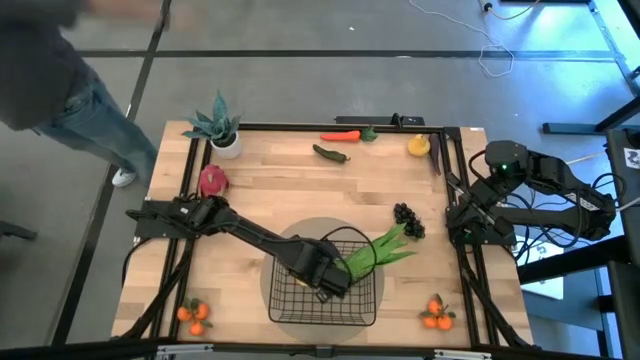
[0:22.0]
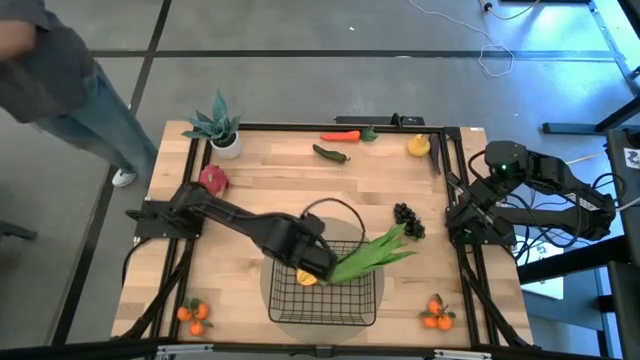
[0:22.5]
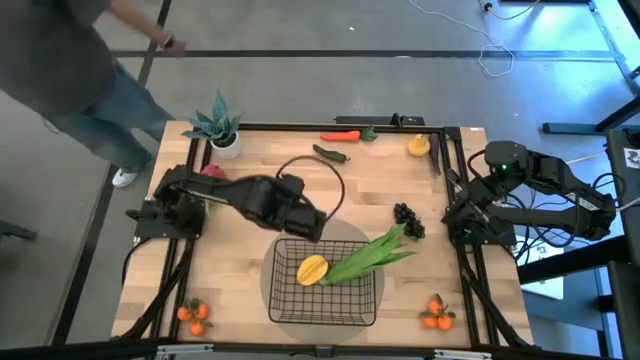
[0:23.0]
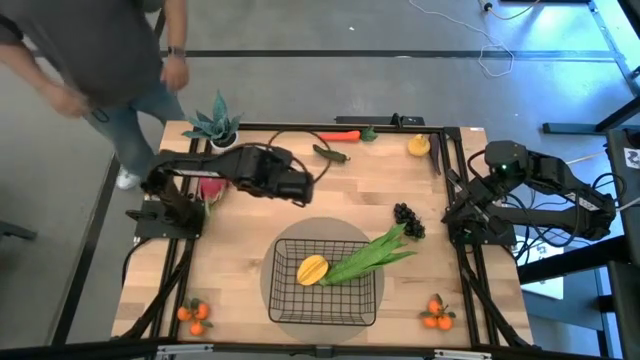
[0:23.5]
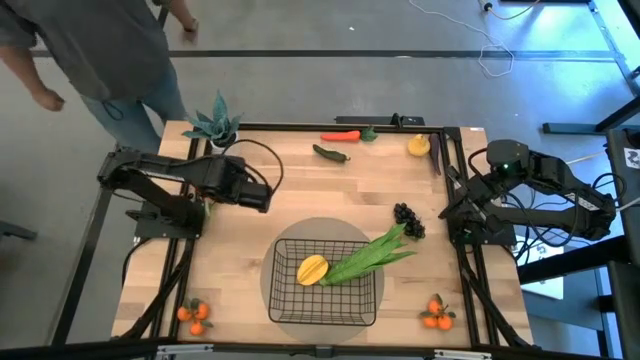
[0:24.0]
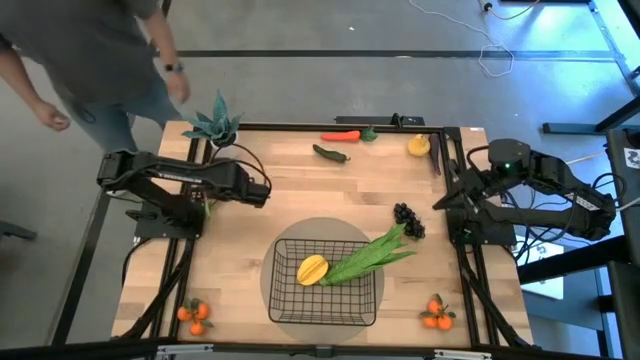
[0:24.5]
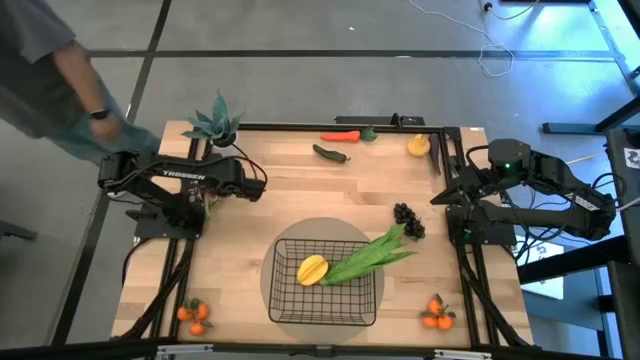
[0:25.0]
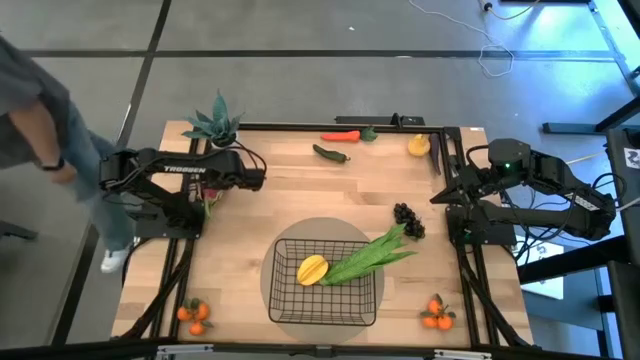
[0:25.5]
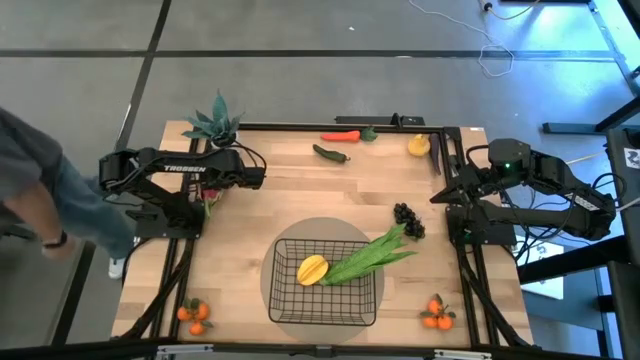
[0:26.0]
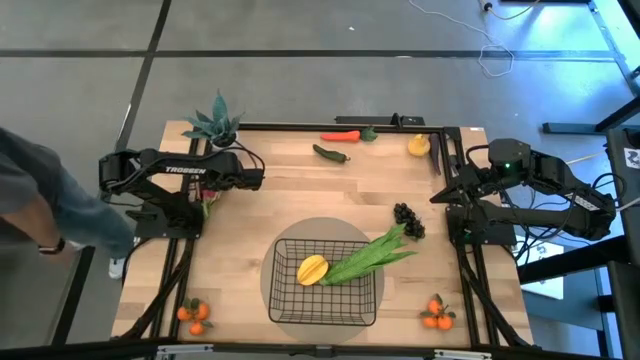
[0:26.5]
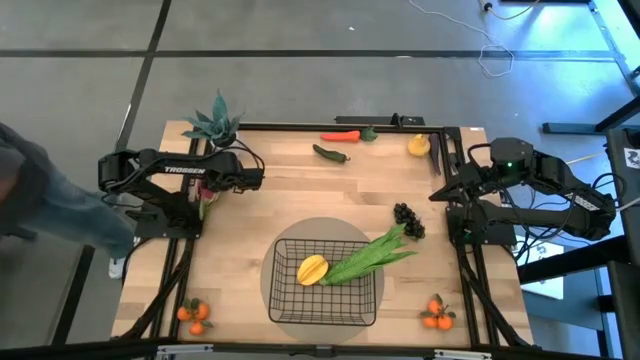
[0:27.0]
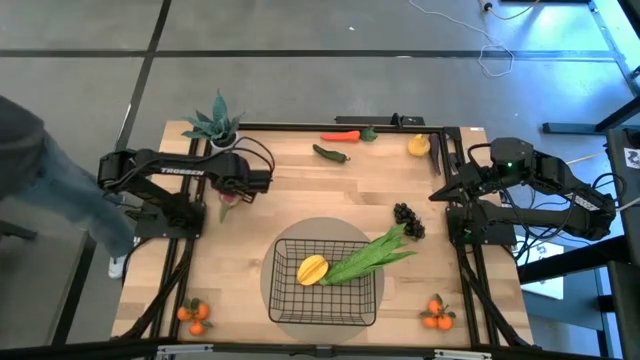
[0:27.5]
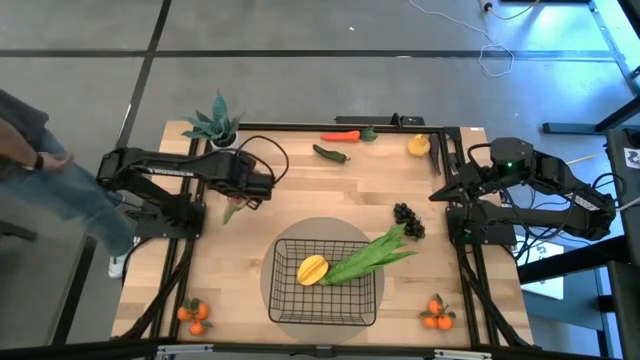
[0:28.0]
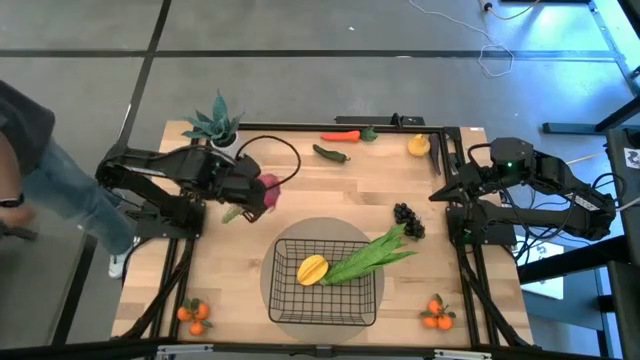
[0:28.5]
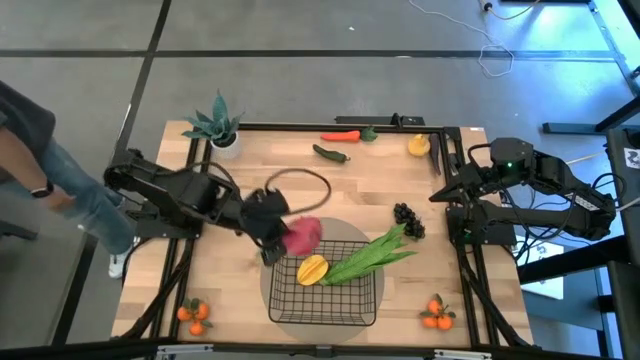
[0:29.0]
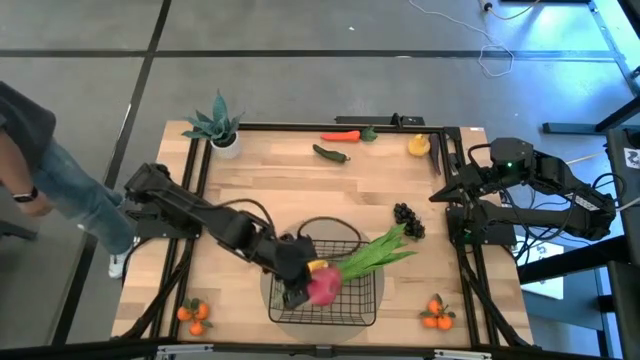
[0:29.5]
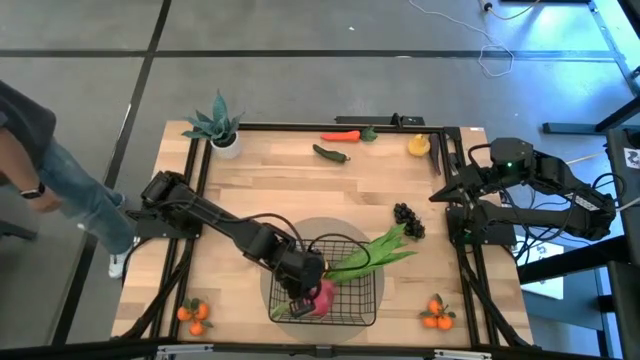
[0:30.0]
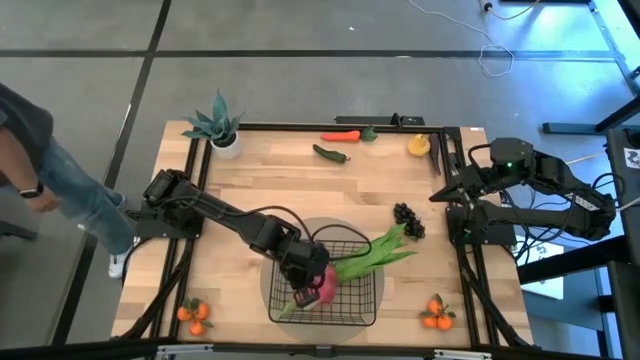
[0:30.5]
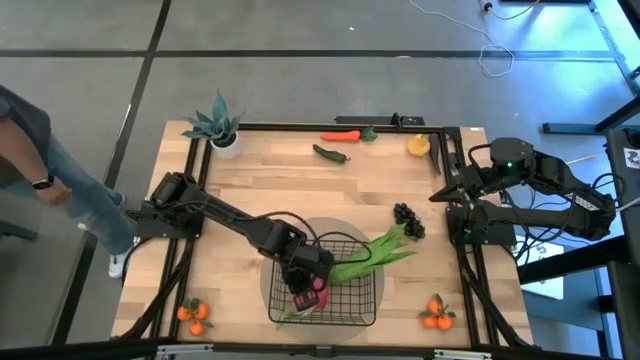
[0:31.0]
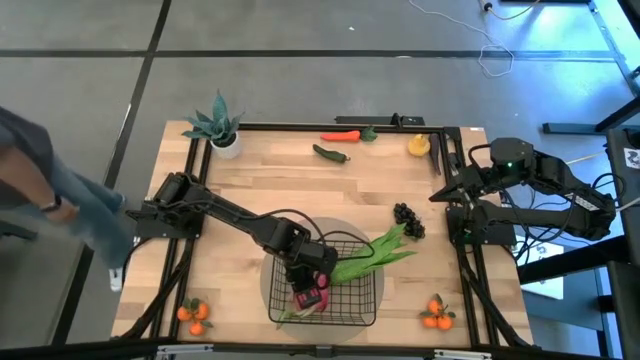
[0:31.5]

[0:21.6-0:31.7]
Task: Build produce basket
Put the dragon fruit into the black bin

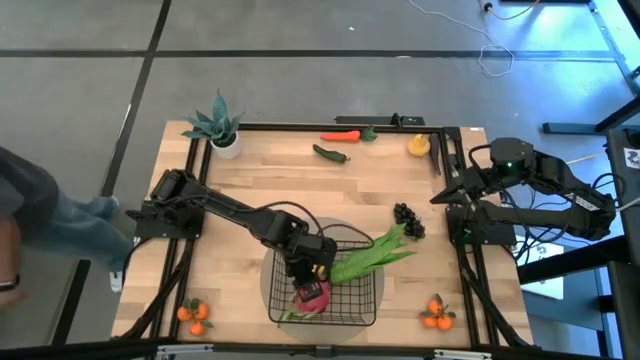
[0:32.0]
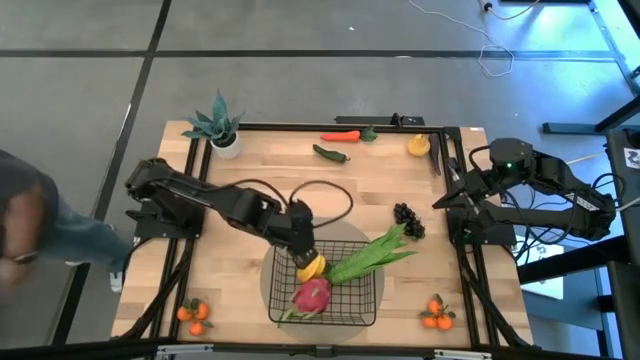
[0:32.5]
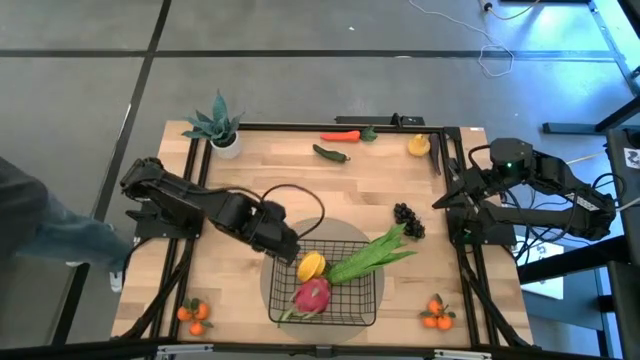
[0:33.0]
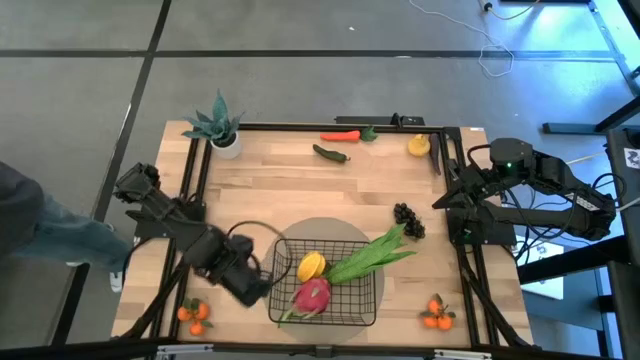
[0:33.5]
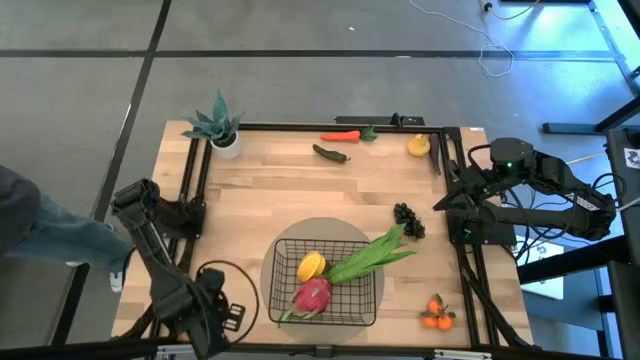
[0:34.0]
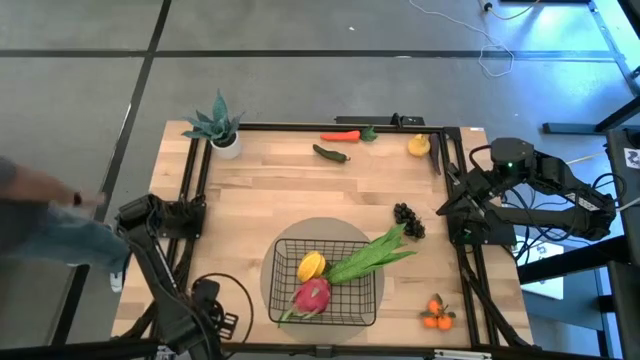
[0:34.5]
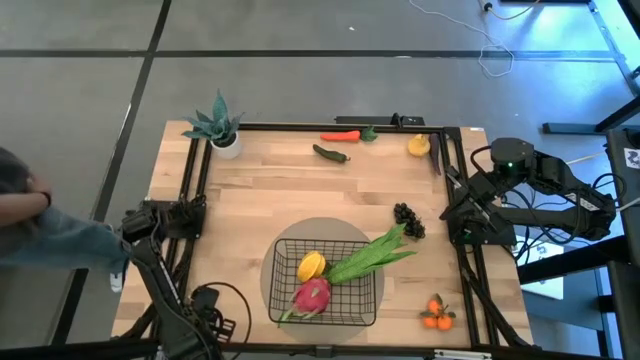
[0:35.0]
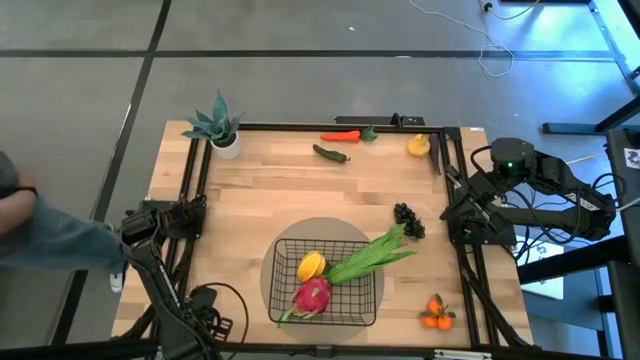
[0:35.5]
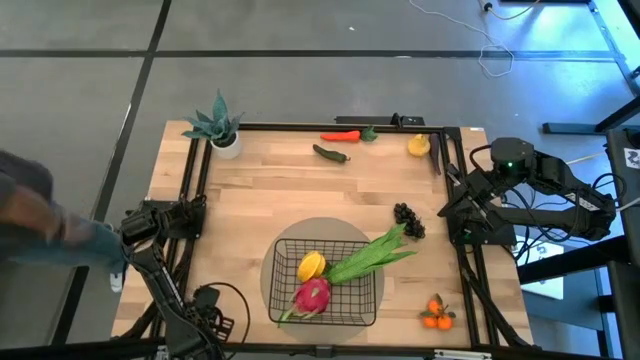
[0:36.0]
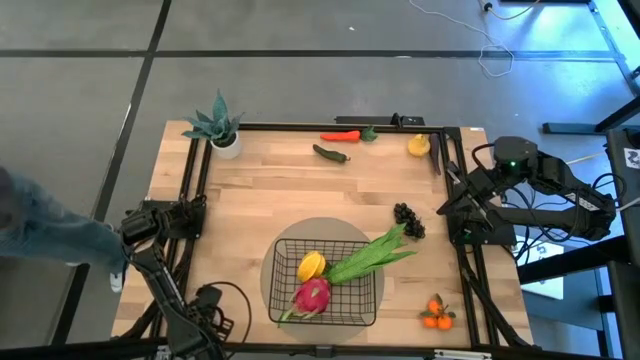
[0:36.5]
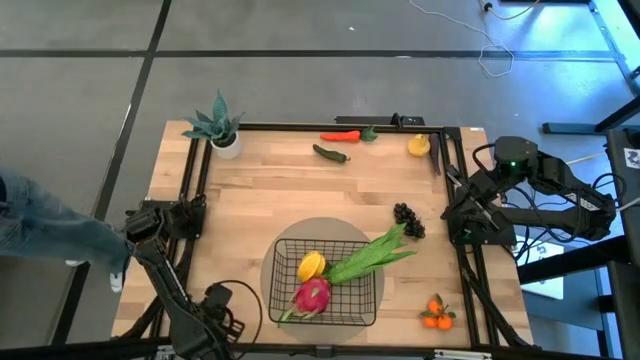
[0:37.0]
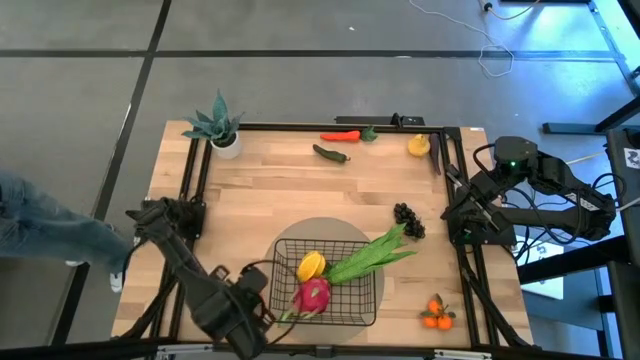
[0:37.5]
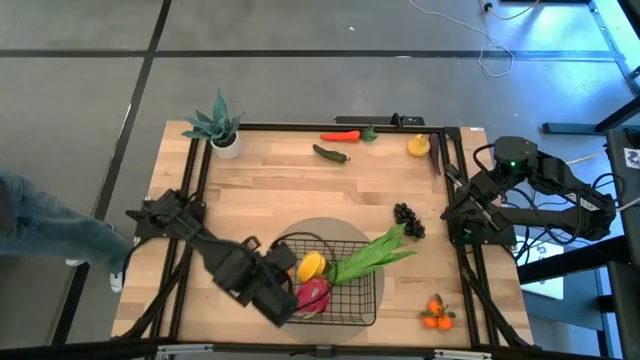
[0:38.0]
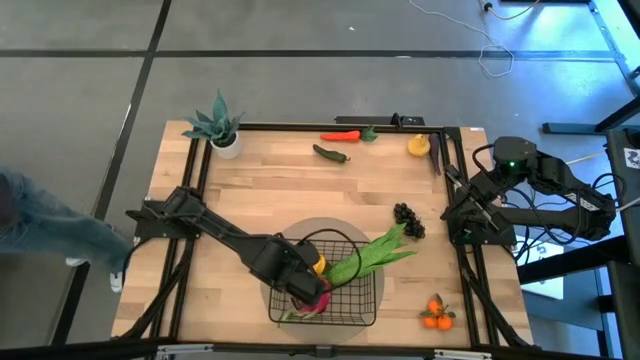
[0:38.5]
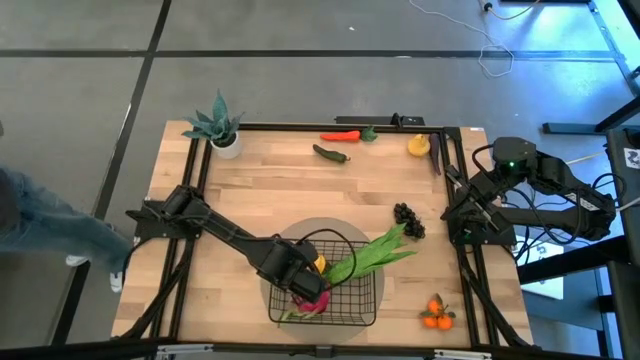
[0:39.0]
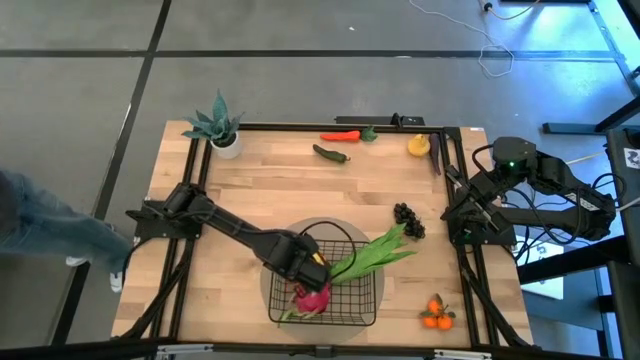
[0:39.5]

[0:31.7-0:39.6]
Put the left bunch of oranges into the black mesh basket

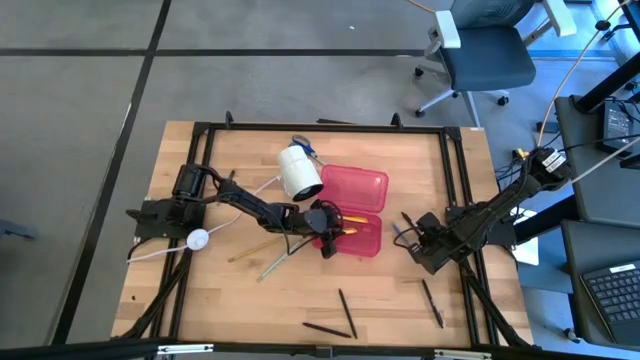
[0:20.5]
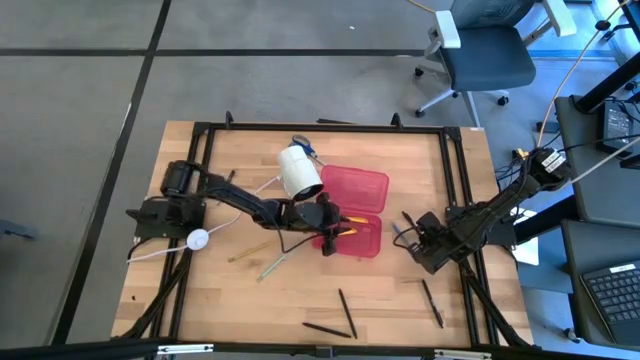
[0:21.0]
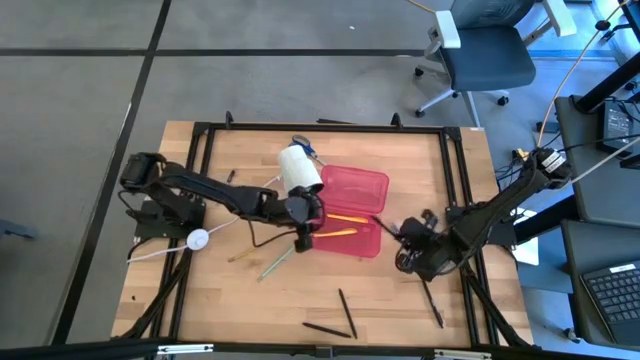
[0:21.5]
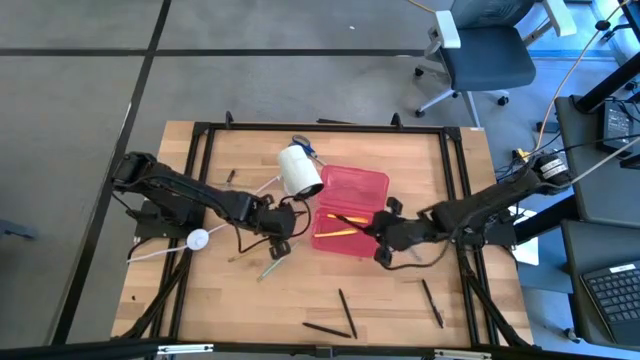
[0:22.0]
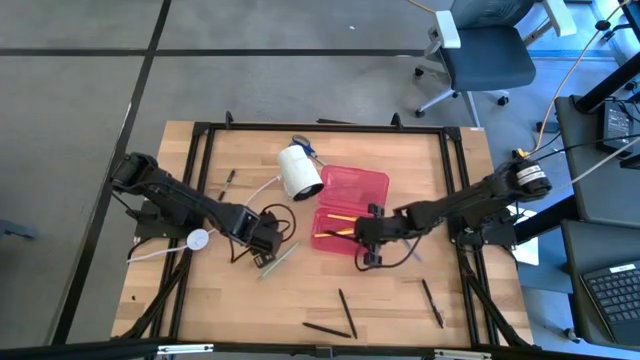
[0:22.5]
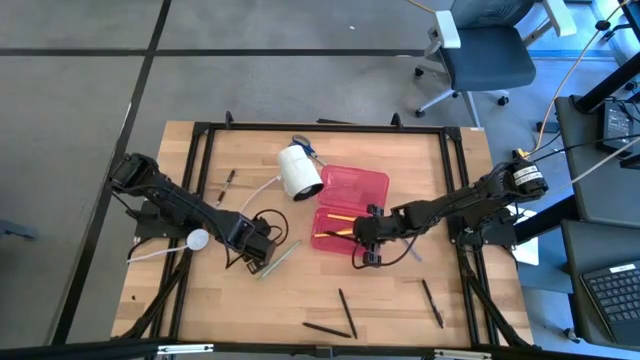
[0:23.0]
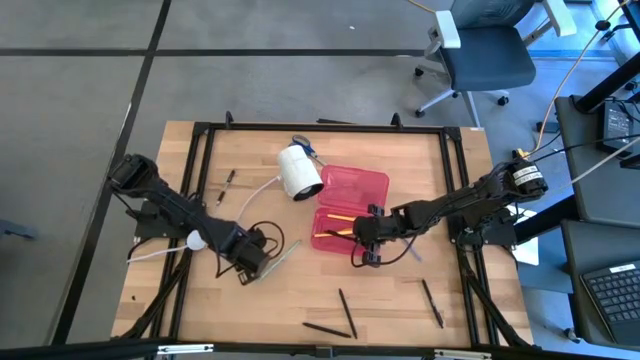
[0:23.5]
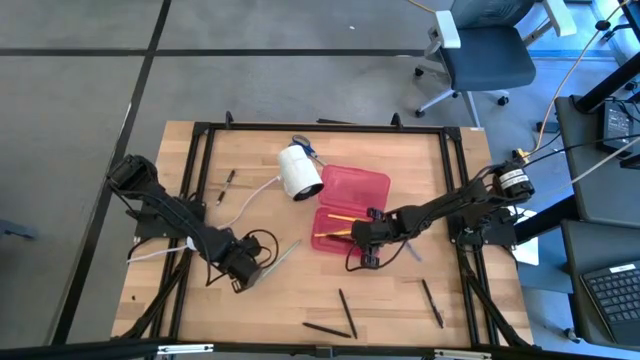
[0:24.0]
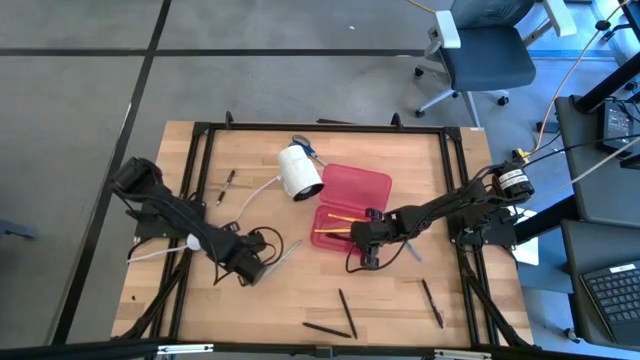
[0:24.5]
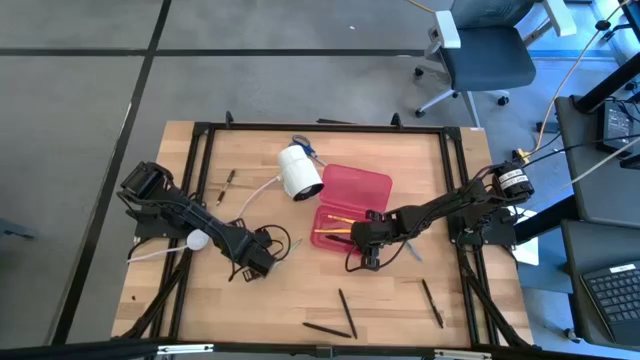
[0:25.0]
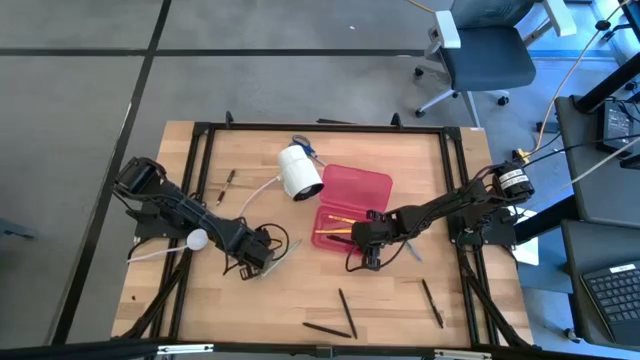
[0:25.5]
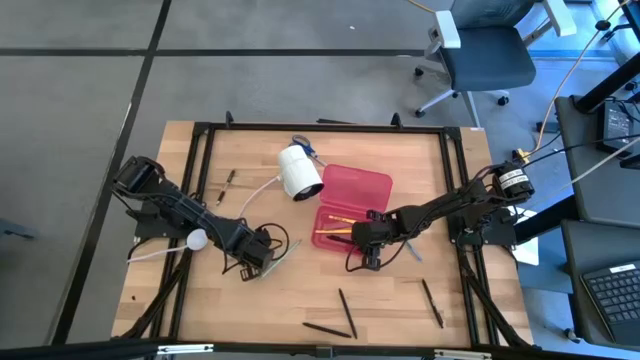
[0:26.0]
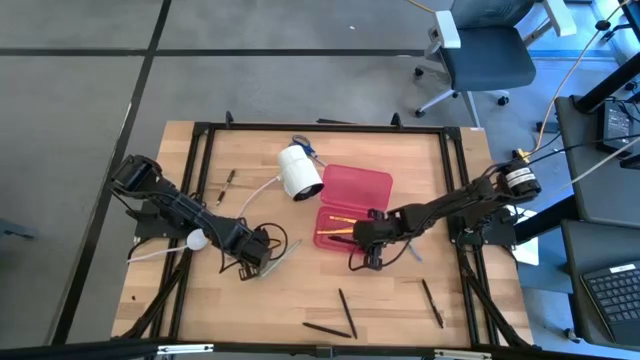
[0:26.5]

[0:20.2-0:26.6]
Task: Pick & place school supplies into a supply box
Put the black pen into the pink supply box
